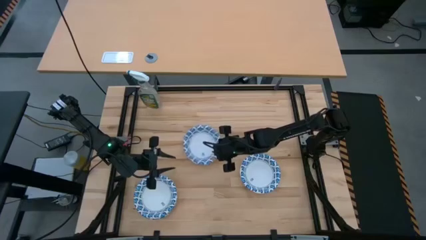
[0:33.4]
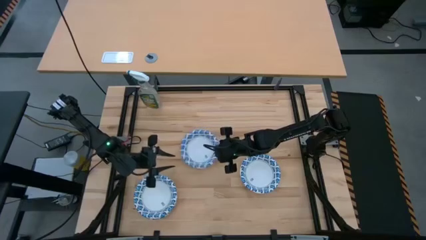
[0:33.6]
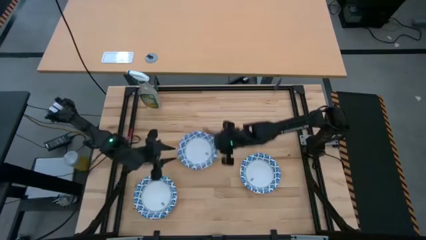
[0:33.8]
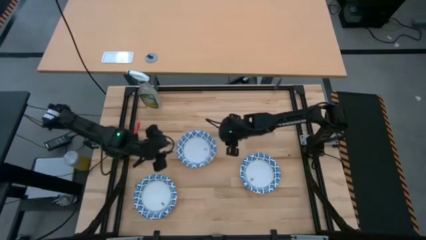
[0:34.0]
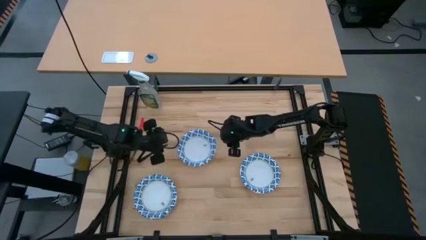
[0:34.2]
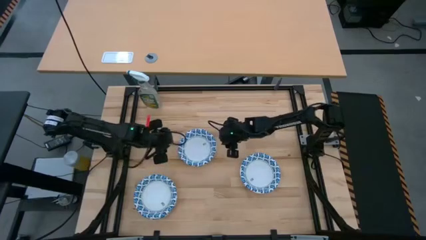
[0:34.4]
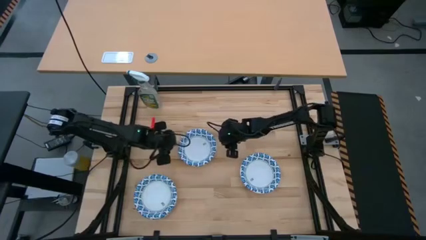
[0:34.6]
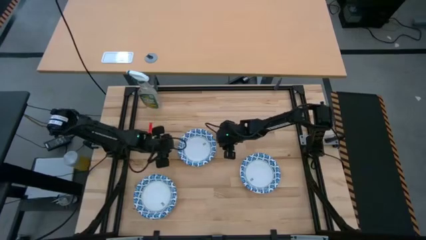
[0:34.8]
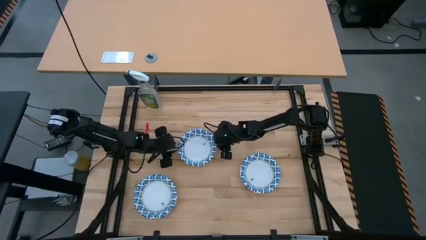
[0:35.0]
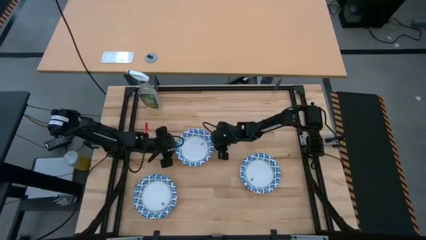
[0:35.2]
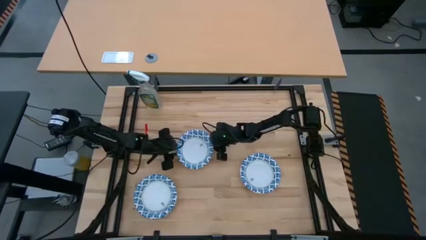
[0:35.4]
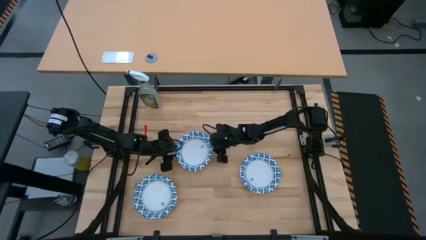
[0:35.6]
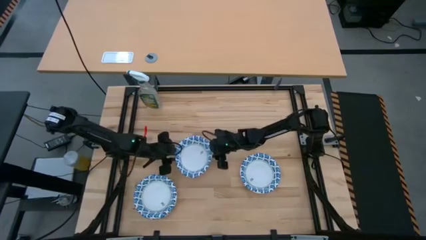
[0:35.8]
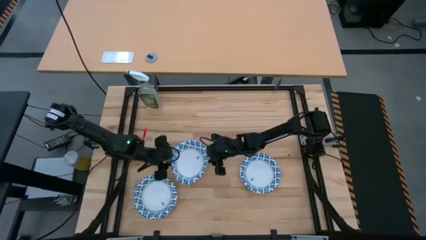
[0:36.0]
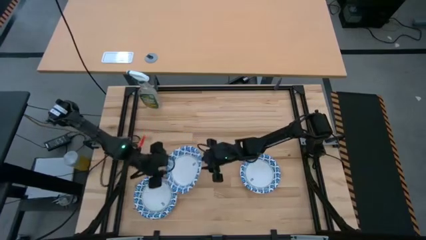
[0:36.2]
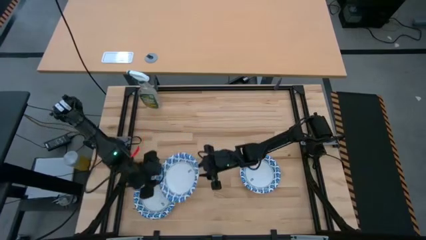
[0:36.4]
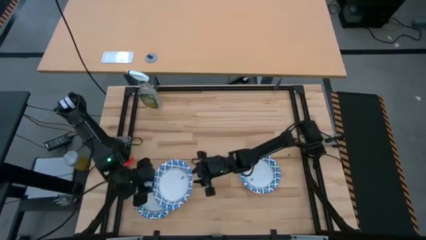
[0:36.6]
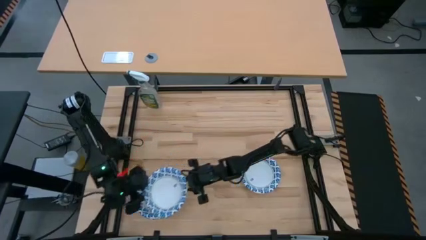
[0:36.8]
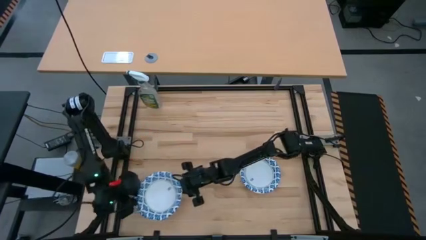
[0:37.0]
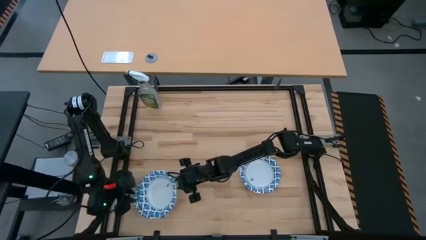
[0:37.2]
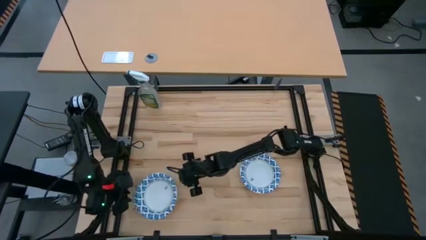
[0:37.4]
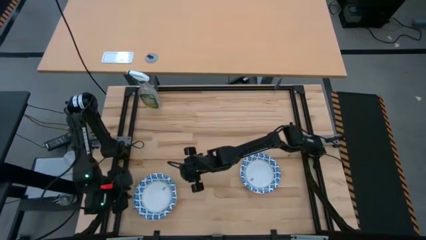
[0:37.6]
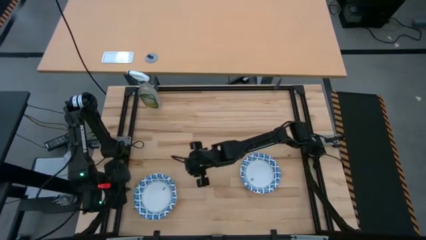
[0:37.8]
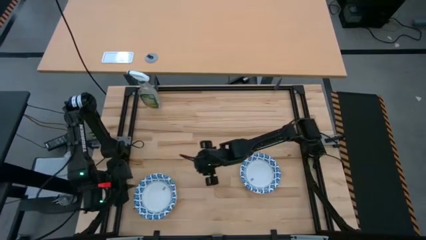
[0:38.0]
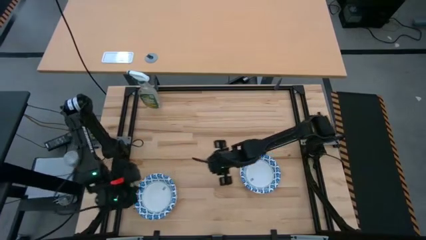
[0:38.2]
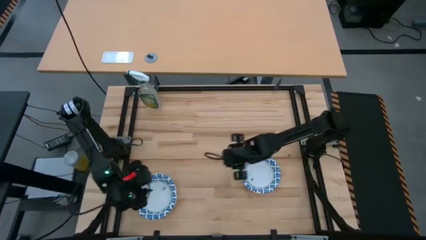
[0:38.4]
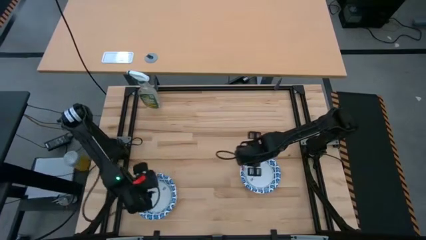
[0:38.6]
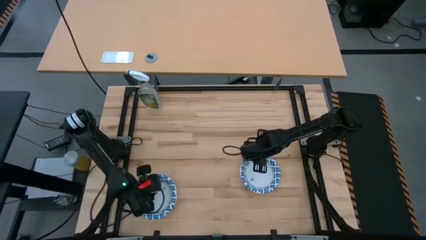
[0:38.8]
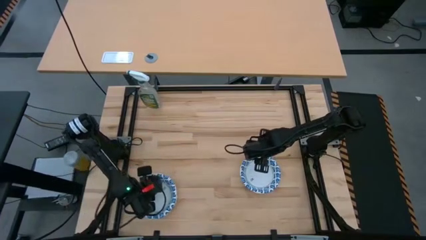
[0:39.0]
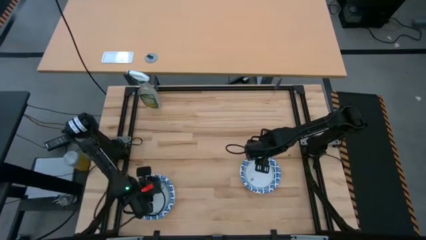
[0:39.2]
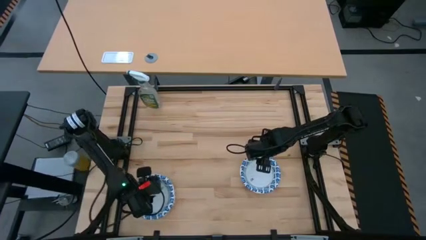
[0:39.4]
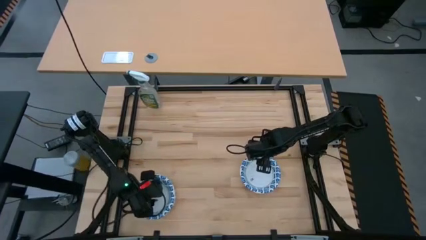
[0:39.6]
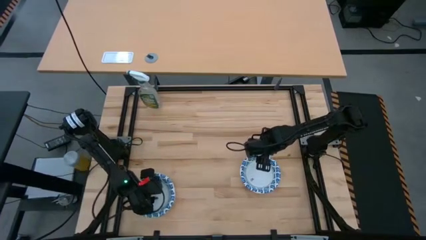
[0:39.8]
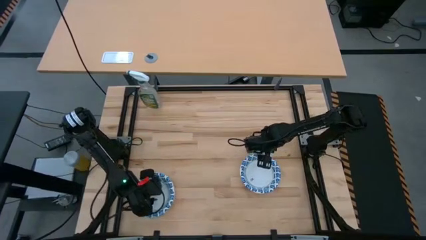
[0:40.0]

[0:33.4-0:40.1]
Stack the blue patterned bowl on top of the blue patterned bowl

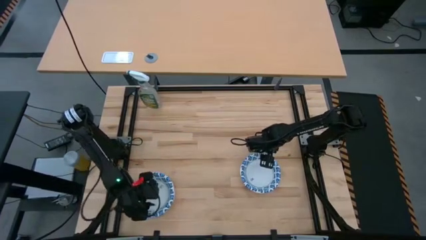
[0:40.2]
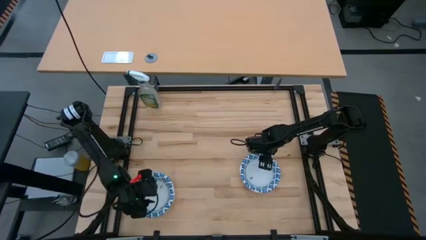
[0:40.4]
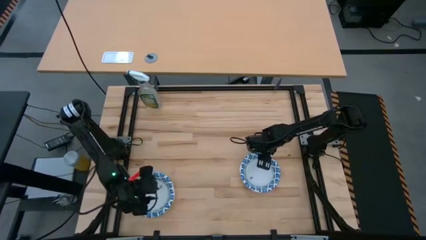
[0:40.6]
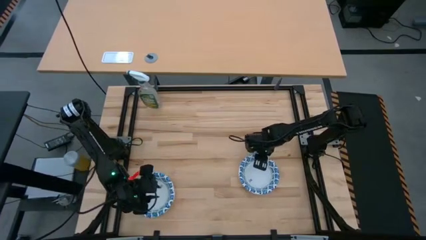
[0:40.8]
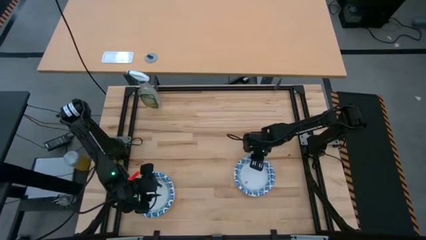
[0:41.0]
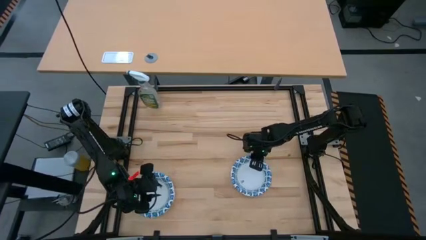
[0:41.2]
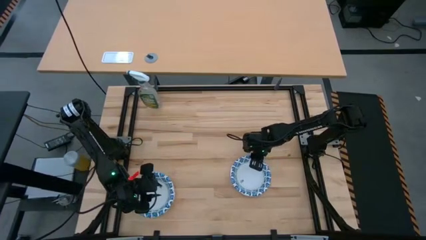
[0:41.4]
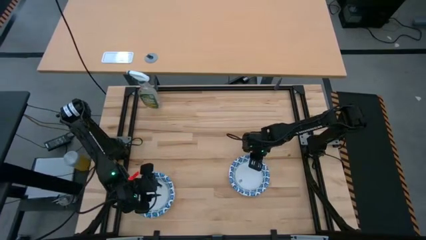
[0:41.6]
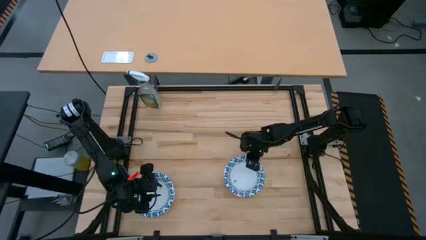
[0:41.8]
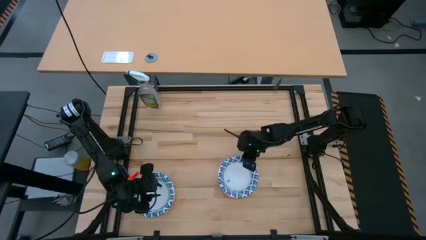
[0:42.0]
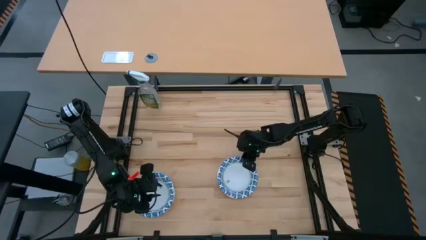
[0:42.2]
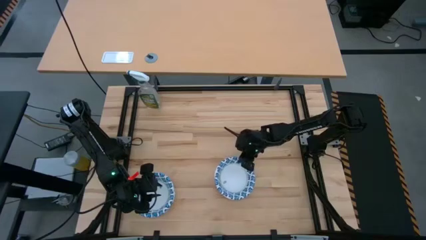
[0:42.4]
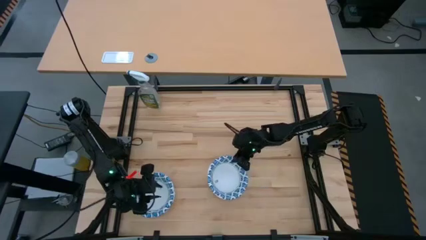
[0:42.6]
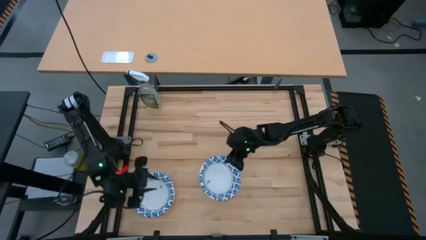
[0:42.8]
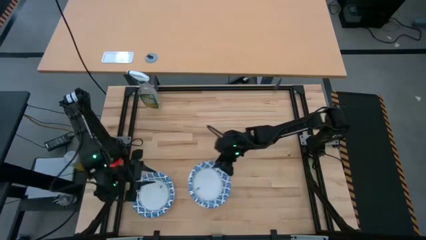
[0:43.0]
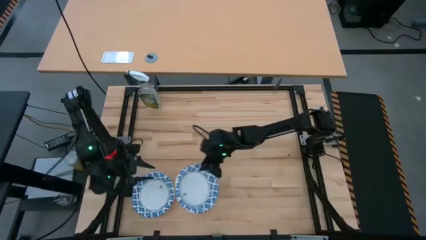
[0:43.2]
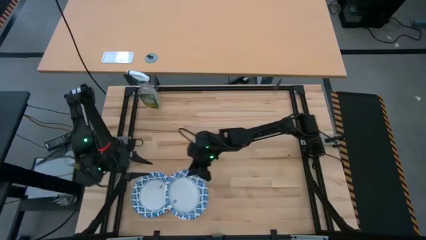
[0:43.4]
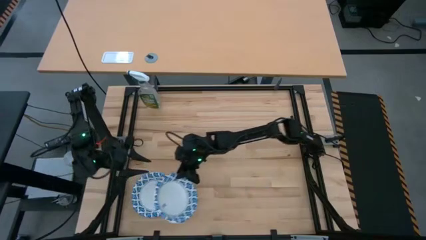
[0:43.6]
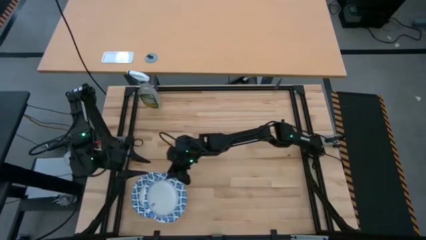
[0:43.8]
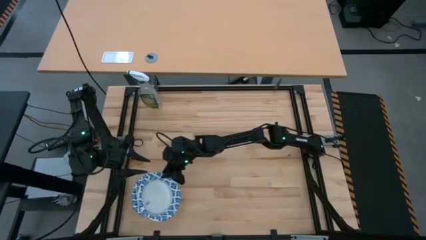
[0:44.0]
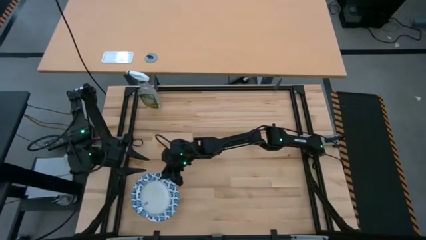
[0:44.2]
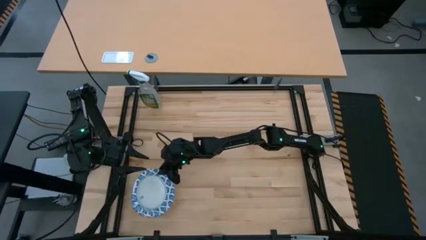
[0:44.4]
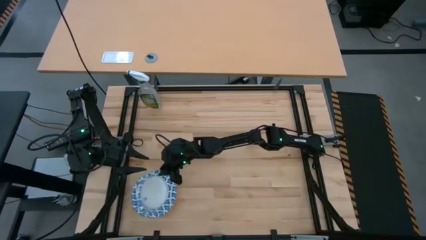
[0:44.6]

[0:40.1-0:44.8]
Stack the blue patterned bowl on top of the blue patterned bowl

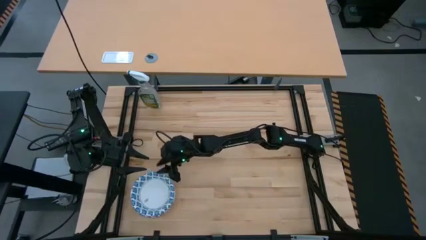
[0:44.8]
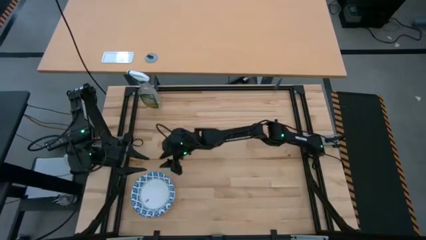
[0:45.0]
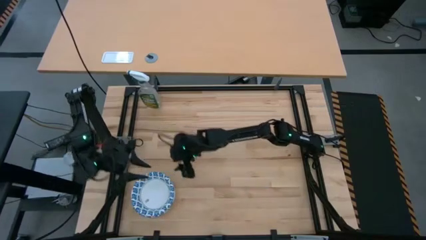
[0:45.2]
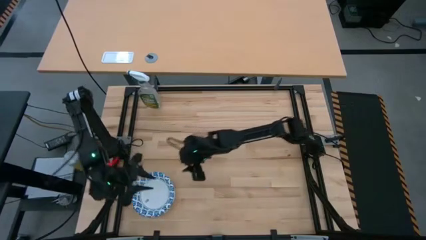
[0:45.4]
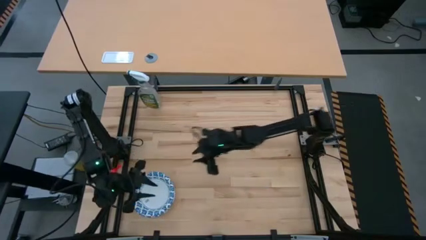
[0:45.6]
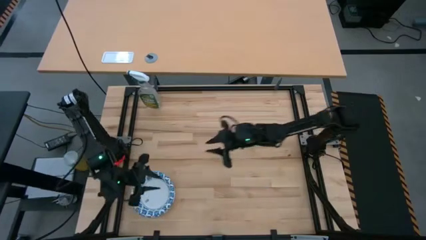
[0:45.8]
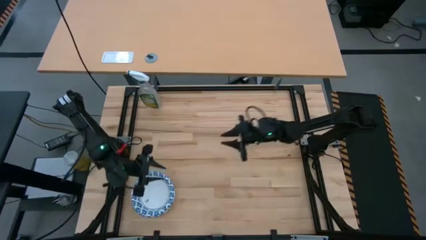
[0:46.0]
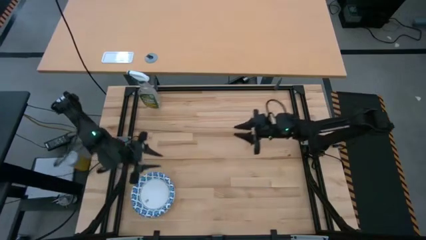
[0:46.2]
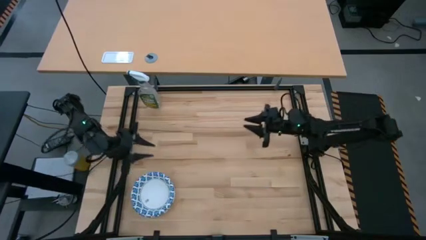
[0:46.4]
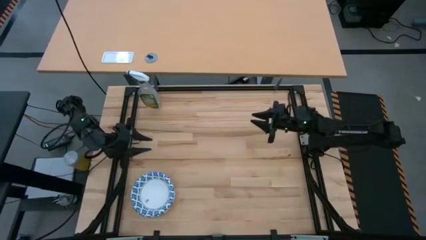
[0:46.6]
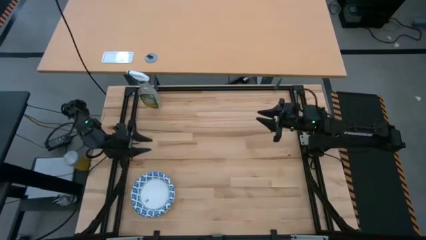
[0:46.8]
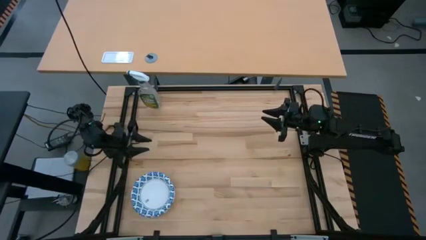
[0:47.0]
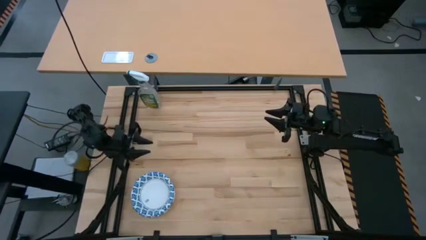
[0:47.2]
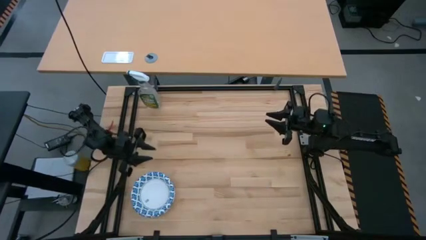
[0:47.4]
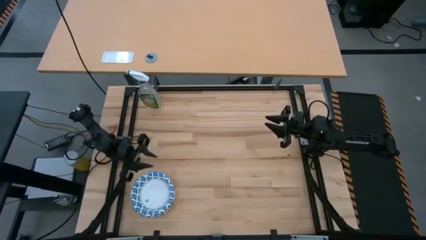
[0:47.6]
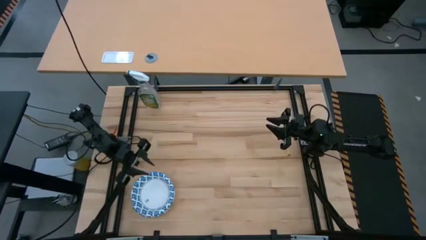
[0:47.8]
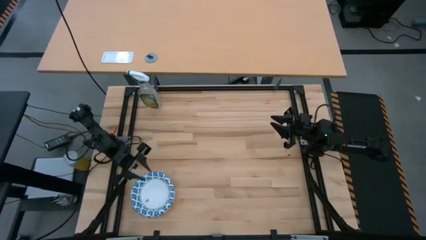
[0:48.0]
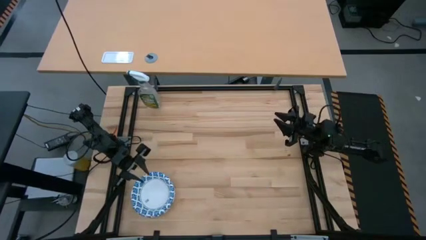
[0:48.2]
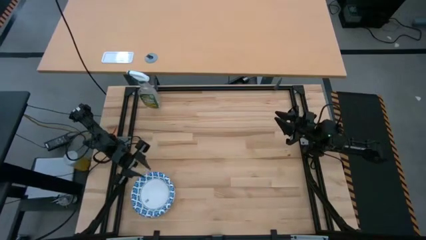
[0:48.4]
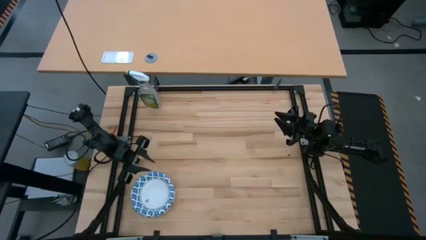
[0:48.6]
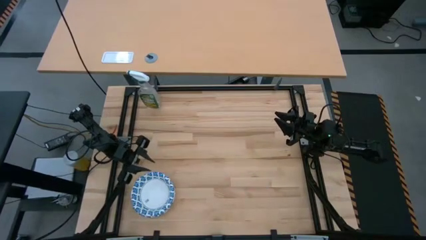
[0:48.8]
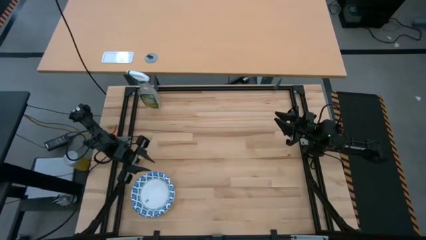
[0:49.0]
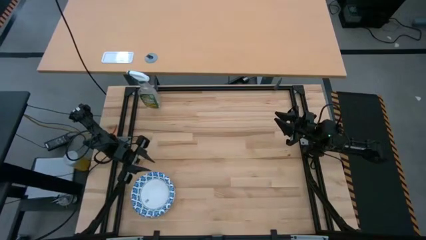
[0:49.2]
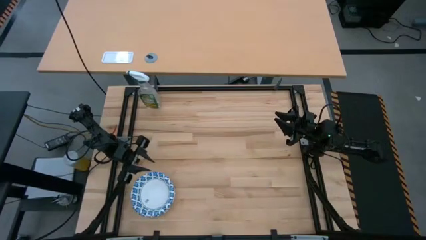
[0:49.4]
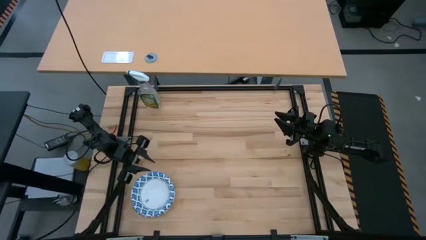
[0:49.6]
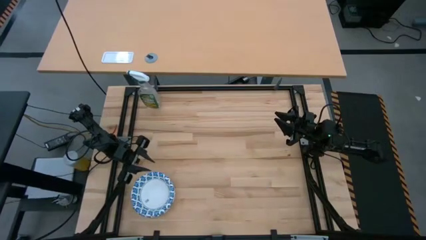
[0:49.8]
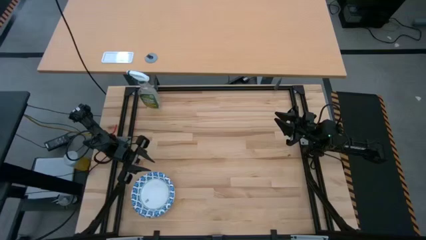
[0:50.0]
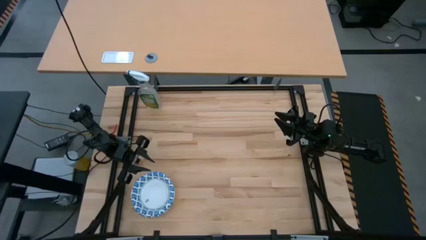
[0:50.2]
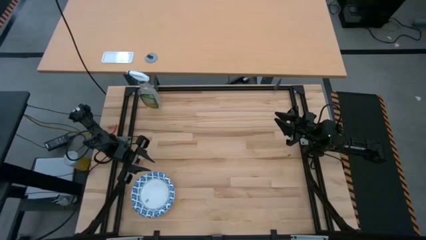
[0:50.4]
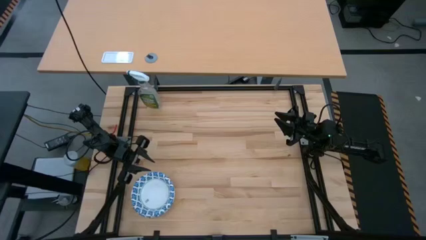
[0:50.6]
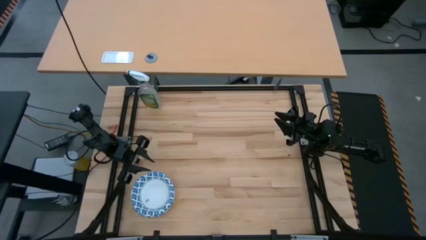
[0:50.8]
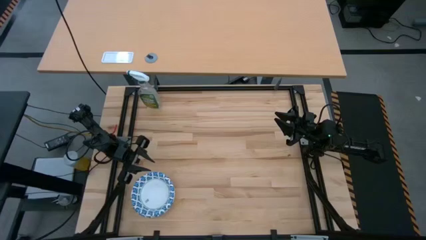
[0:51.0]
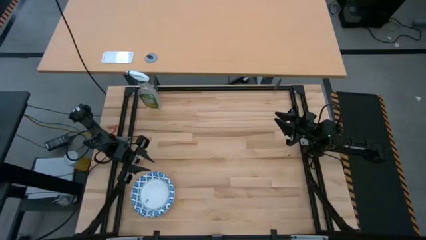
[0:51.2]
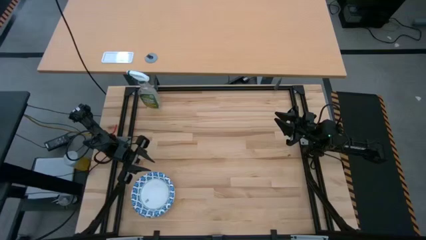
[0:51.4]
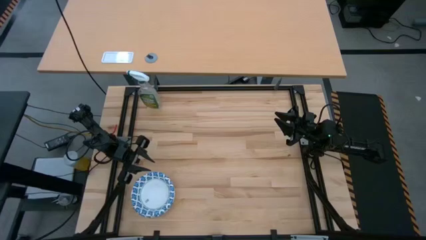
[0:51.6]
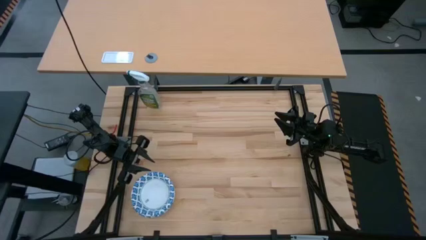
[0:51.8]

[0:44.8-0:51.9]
Return to Home Position
